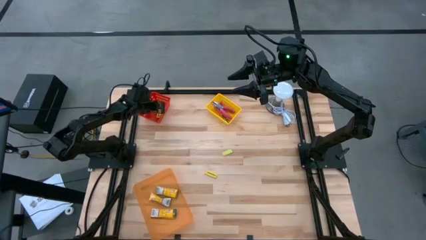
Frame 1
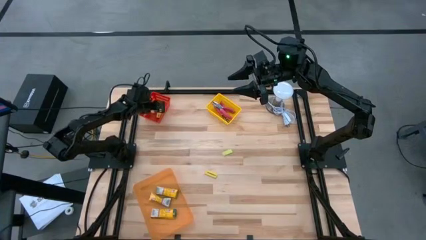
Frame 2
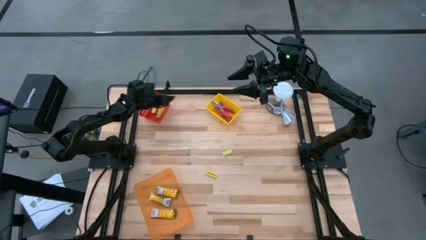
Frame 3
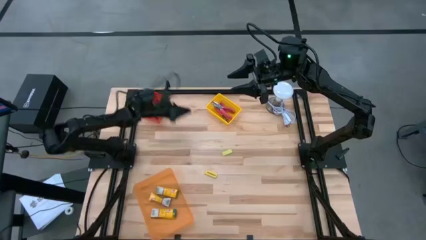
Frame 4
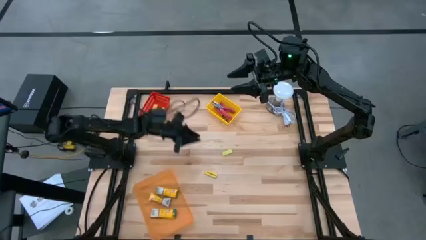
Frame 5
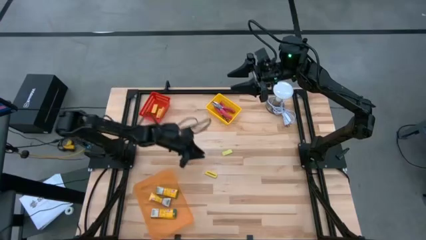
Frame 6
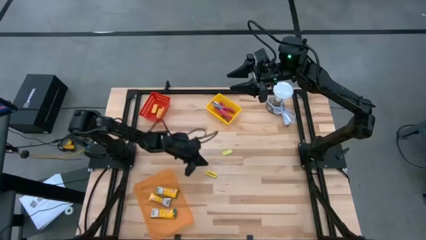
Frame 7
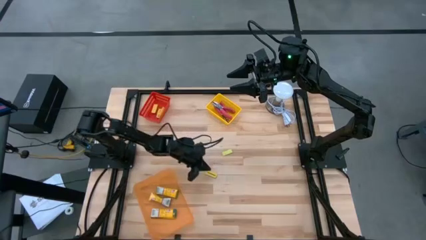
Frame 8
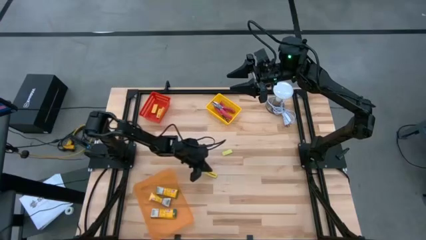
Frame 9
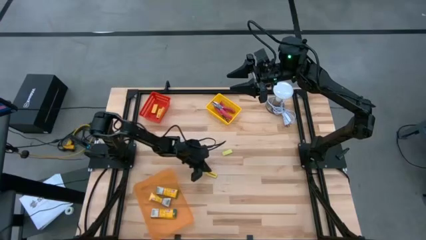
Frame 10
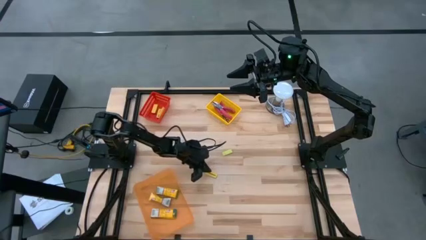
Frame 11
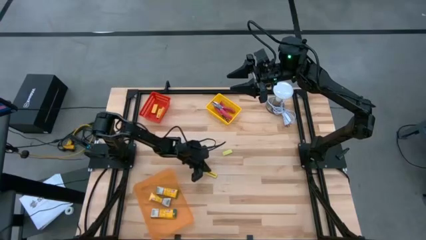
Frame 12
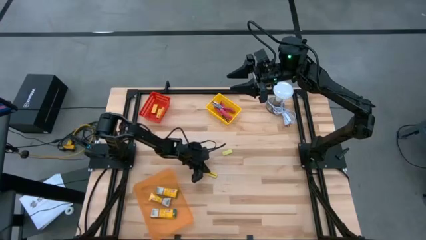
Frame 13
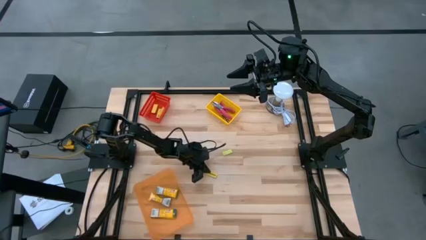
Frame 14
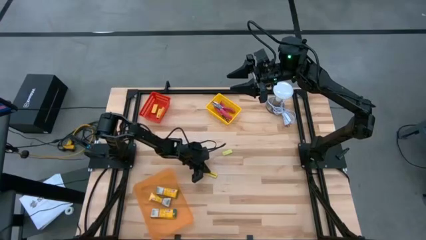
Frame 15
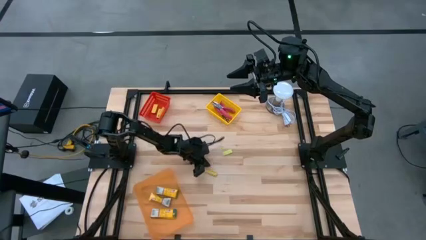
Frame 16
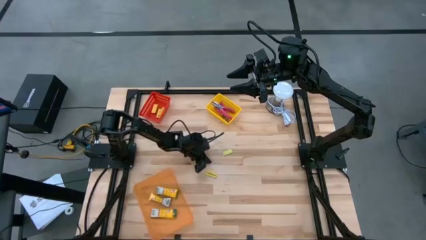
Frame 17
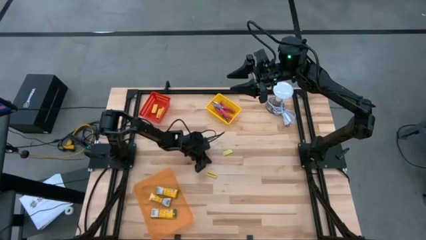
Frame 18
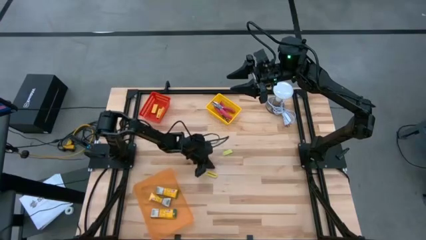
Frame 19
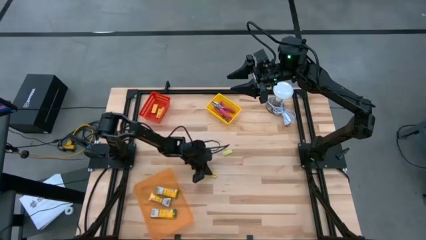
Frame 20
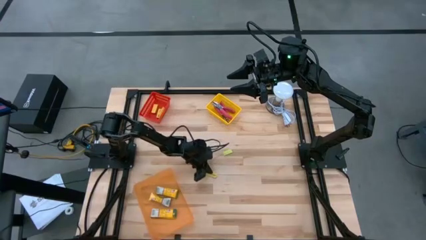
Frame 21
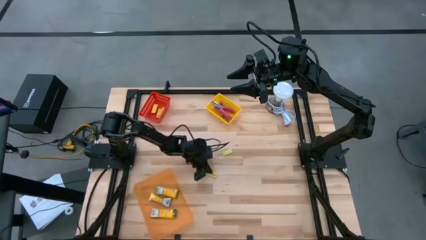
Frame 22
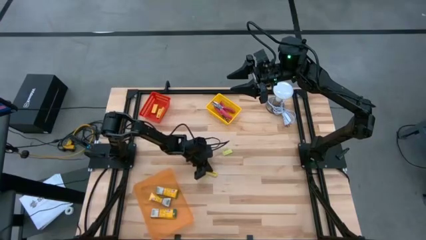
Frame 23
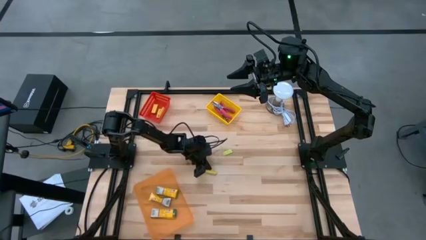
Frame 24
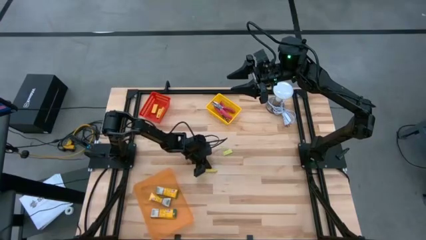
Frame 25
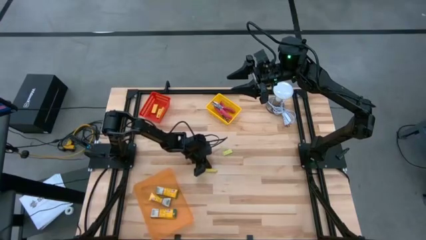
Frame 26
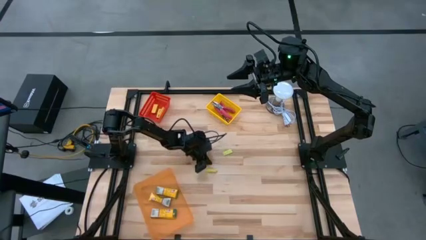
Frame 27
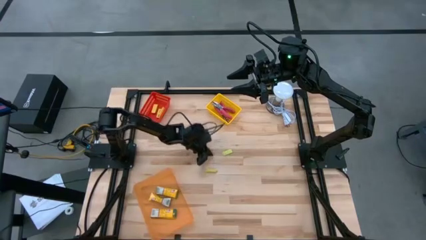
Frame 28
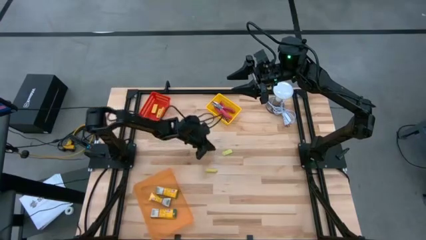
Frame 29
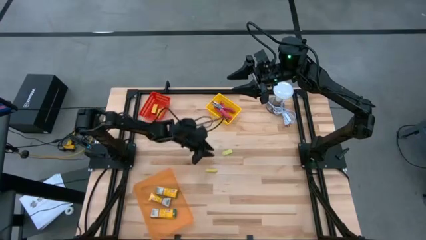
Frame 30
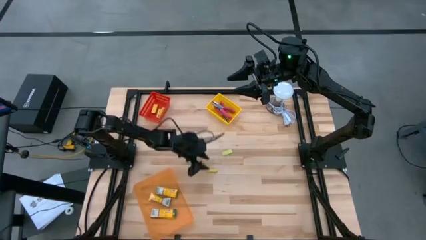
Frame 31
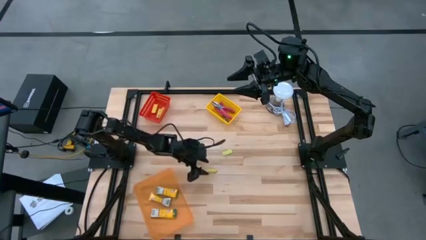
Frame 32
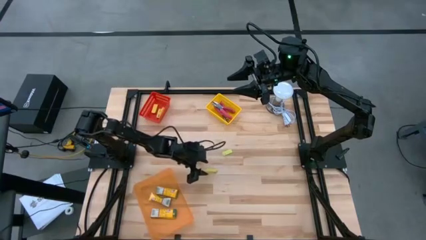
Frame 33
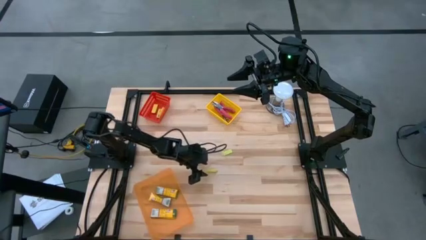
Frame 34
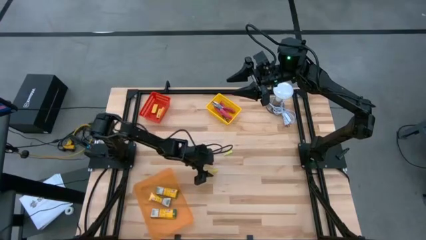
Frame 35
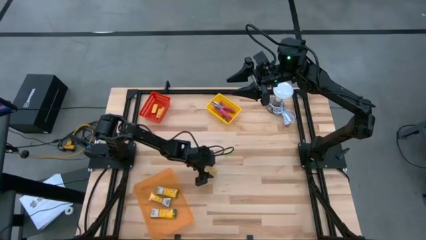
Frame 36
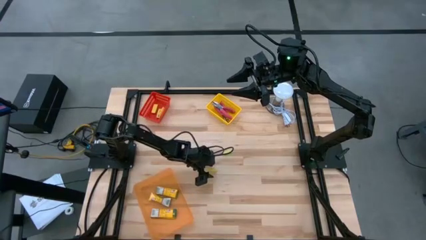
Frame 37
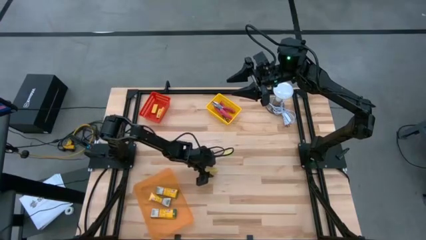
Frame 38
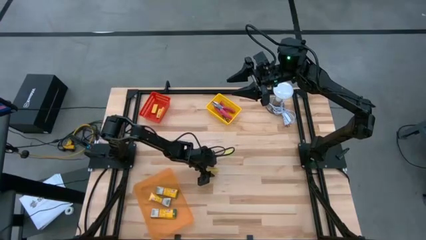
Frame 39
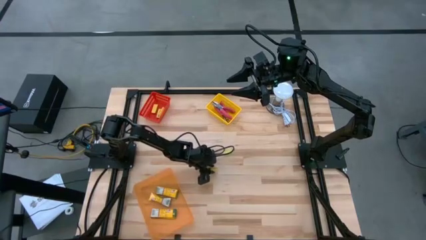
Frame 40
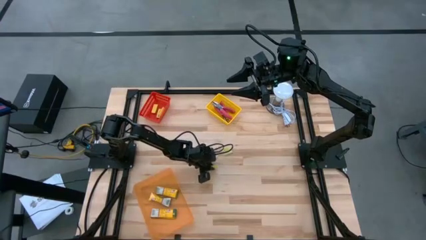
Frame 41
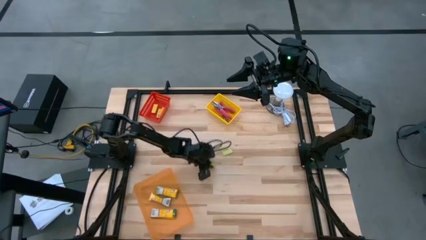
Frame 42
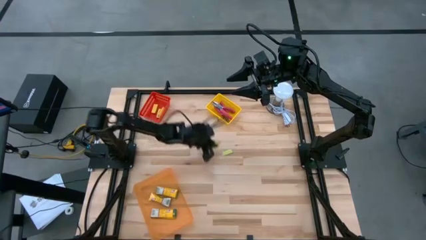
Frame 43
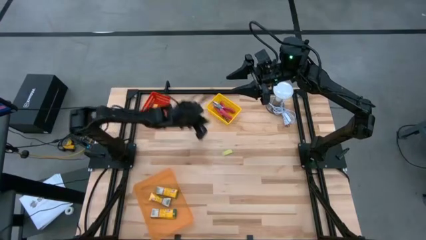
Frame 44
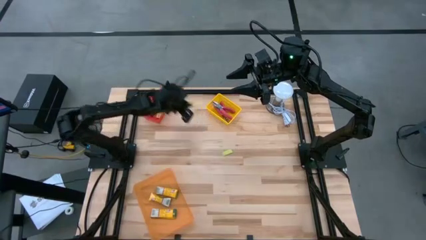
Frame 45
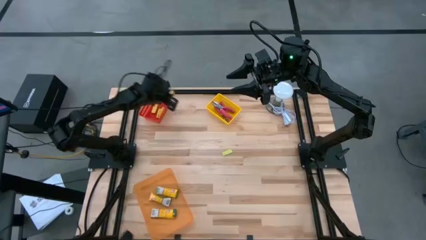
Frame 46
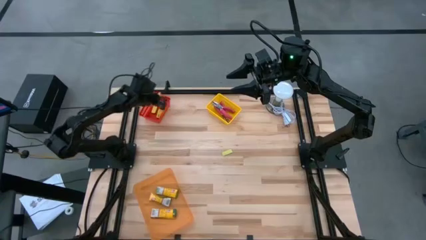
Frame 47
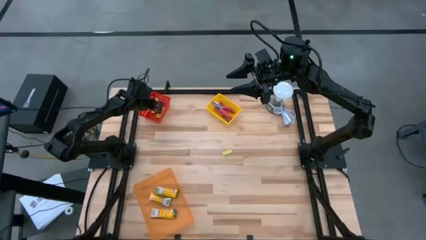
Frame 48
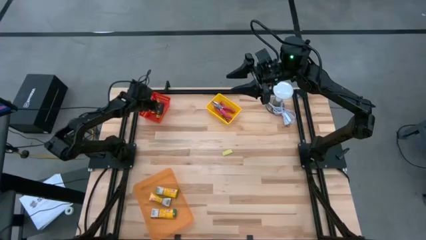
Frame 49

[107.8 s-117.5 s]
Task: Pick & Place School Supplies
Put the yellow eraser into the red bin

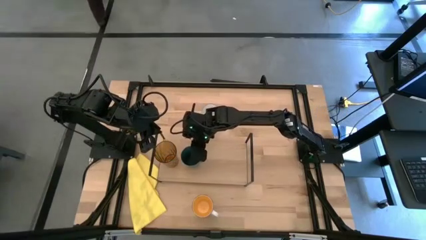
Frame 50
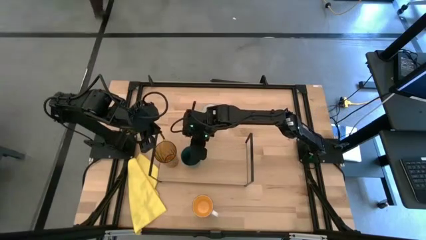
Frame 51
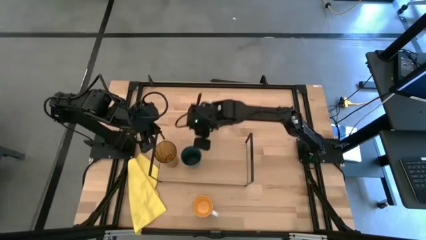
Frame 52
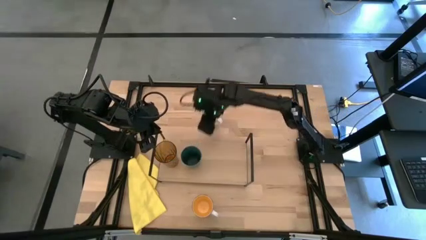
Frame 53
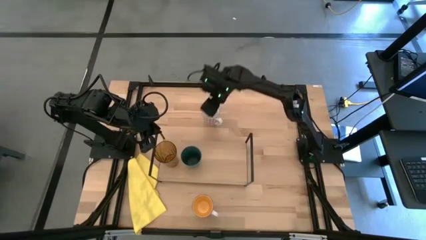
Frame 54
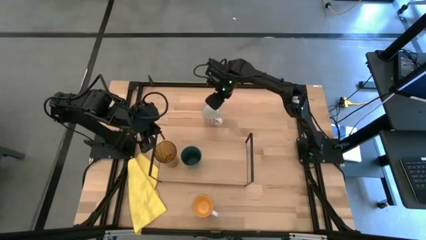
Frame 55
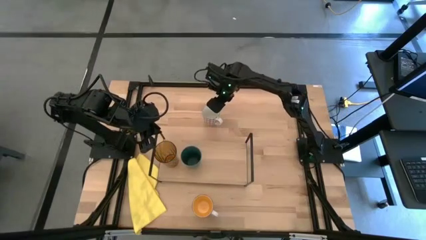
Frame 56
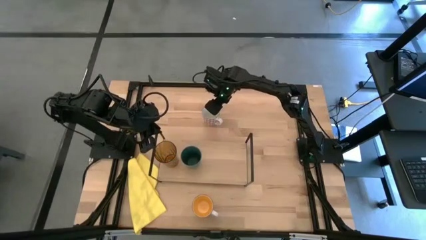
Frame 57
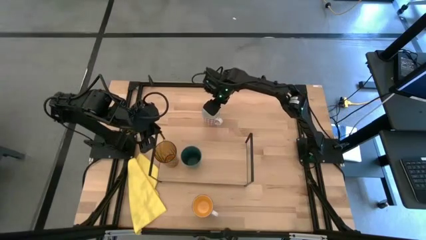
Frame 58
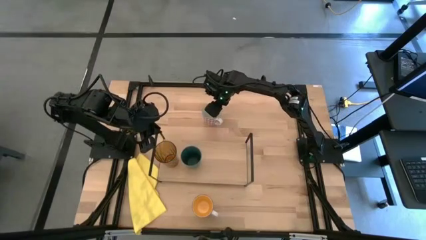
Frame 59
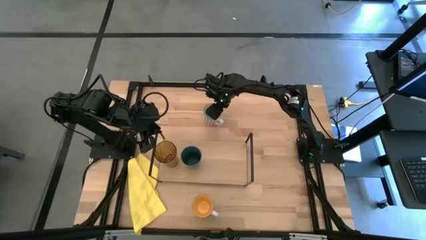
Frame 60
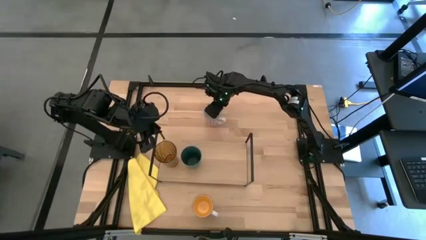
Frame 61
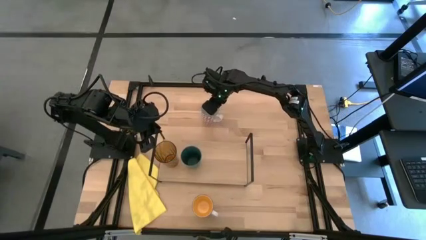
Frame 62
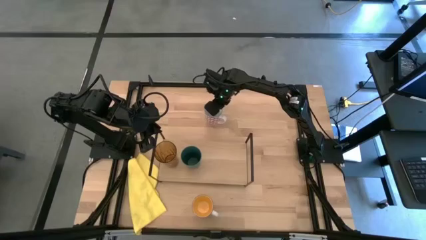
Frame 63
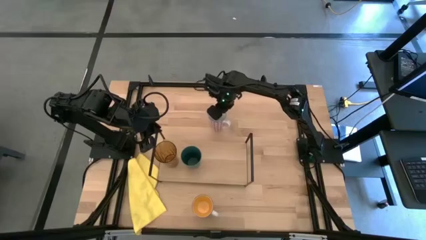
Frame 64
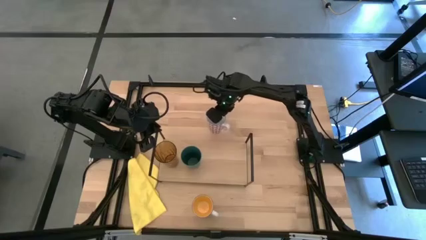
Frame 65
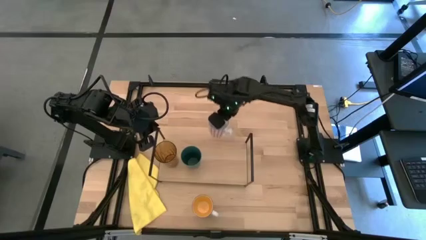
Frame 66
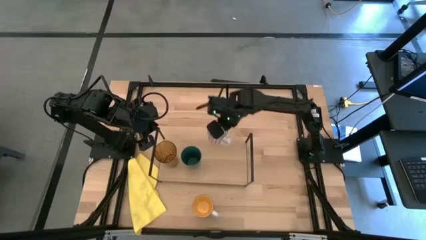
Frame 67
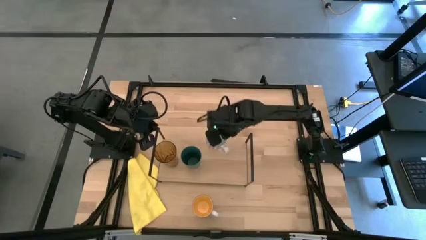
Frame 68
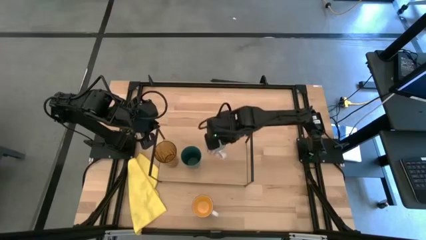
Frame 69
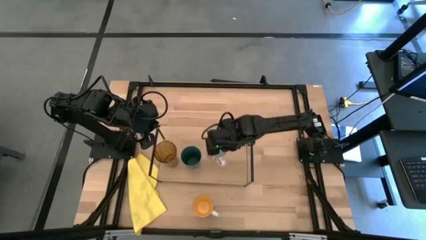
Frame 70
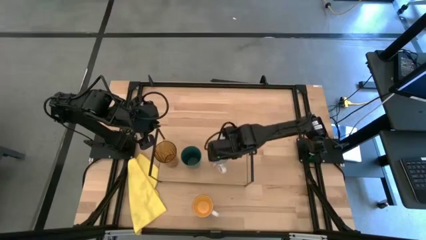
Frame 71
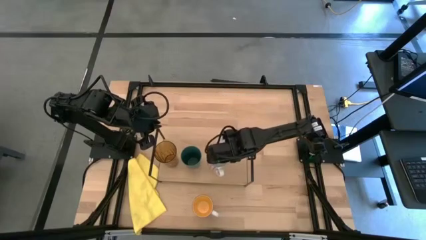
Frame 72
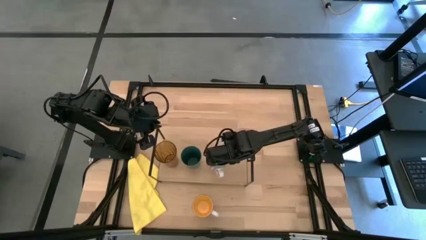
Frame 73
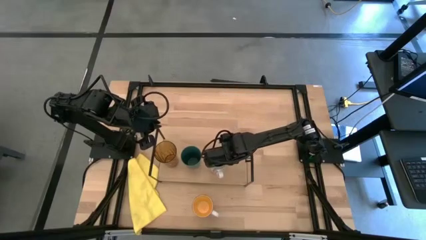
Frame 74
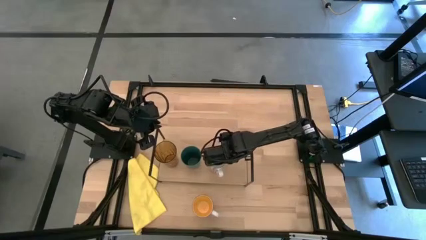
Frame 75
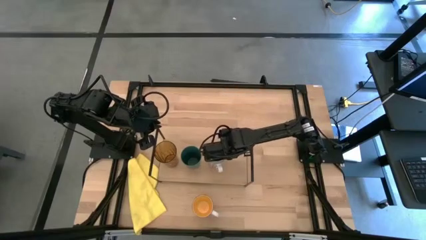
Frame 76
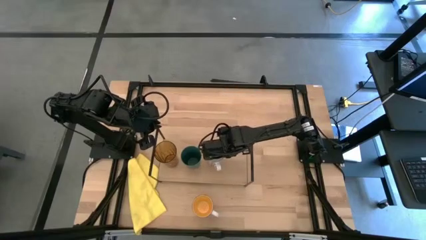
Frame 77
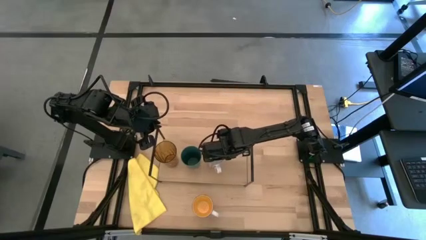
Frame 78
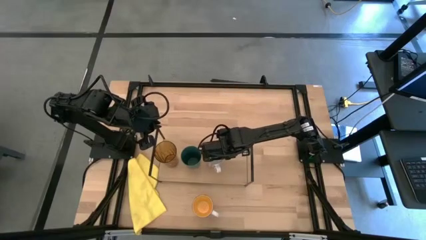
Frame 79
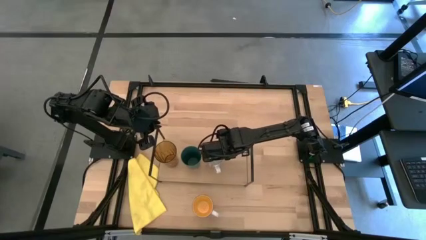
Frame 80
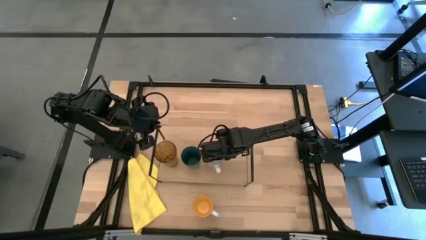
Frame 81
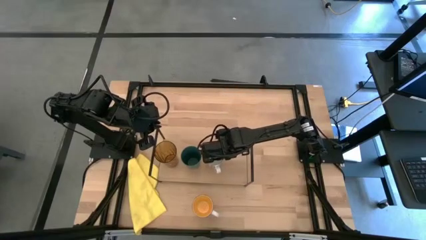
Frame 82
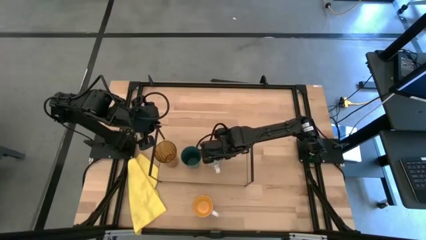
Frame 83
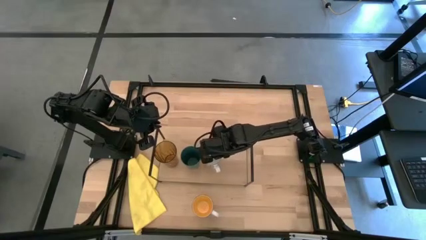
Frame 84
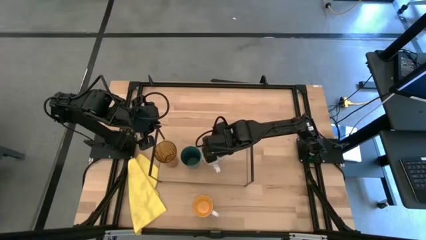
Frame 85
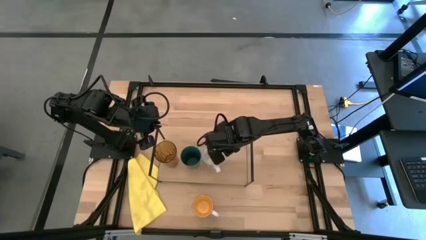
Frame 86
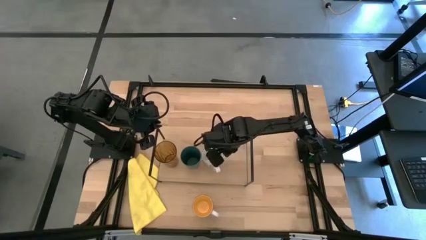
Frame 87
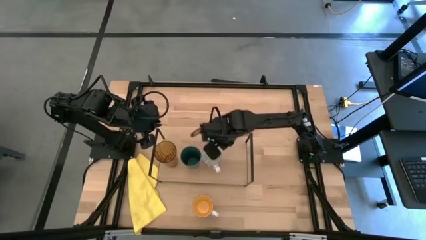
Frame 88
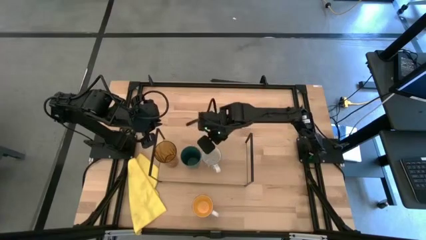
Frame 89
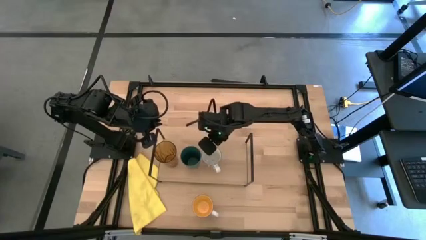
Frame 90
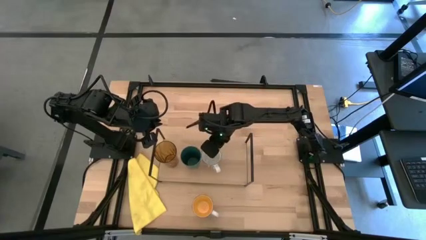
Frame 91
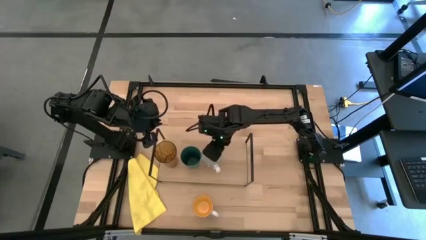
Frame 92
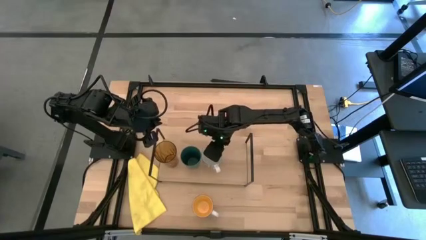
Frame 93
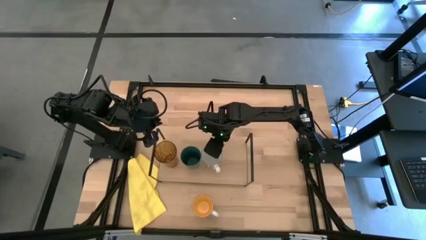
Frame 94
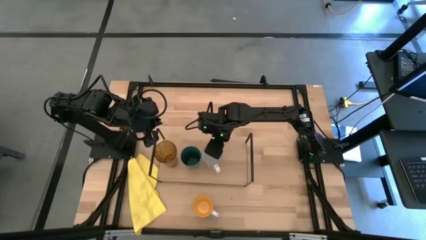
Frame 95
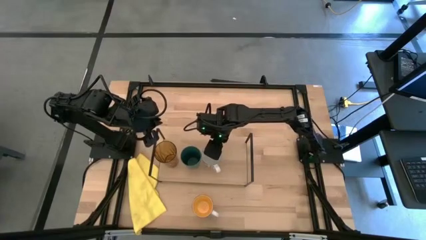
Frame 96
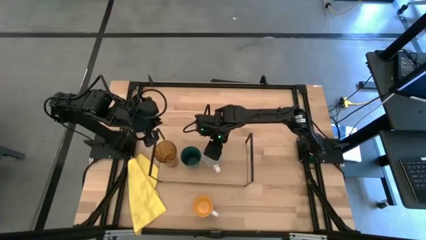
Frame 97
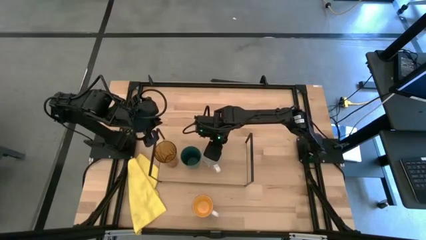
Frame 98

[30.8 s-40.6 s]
Task: Stack small to large cups/mugs on shelf
Put the red mug on the shelf
